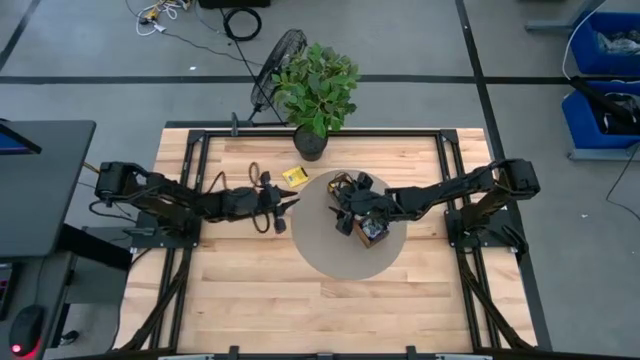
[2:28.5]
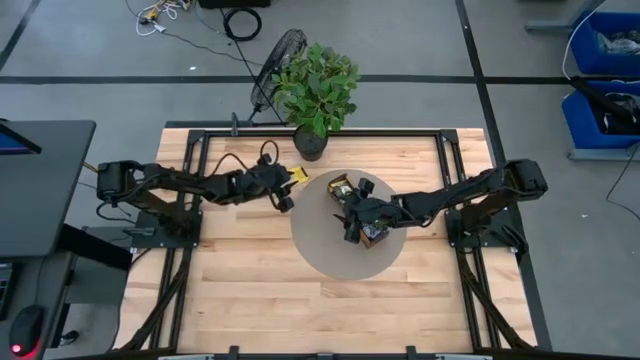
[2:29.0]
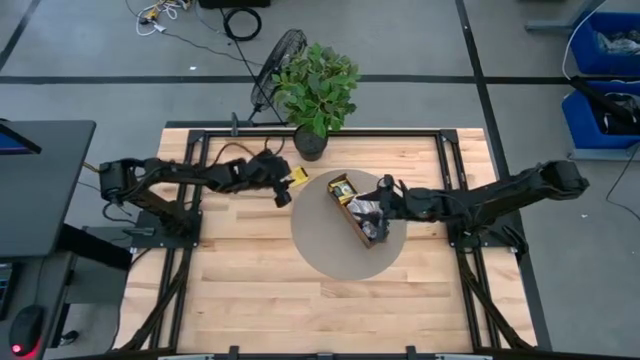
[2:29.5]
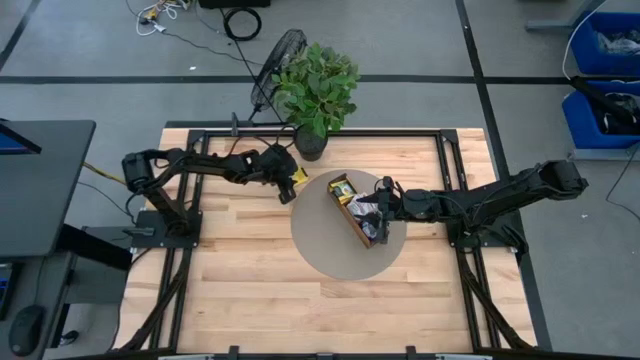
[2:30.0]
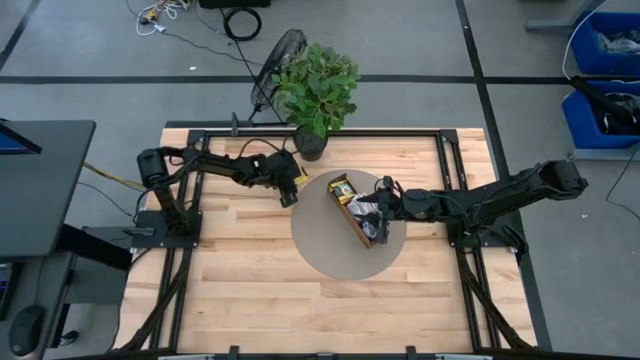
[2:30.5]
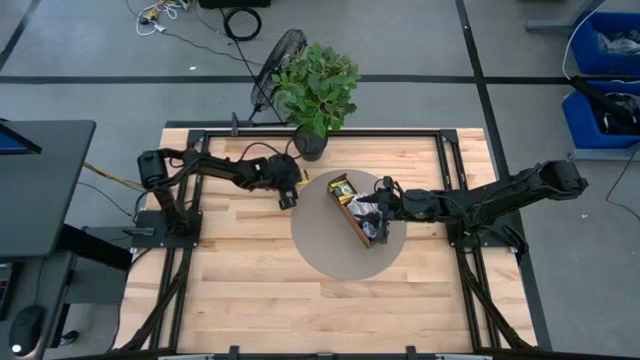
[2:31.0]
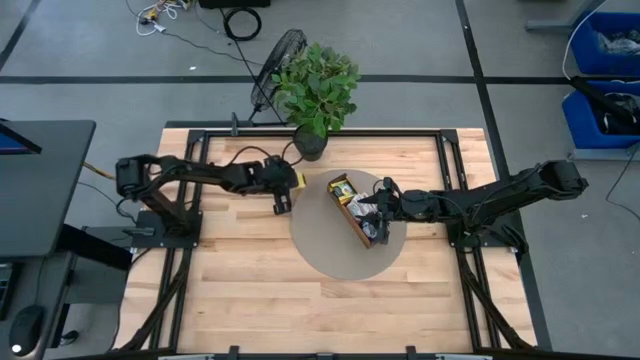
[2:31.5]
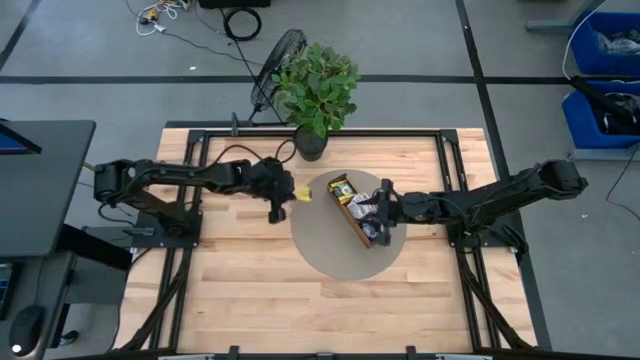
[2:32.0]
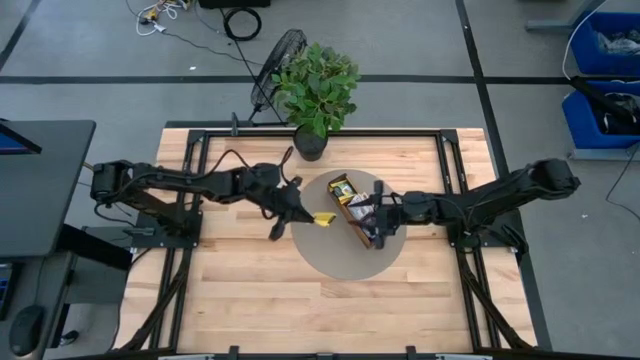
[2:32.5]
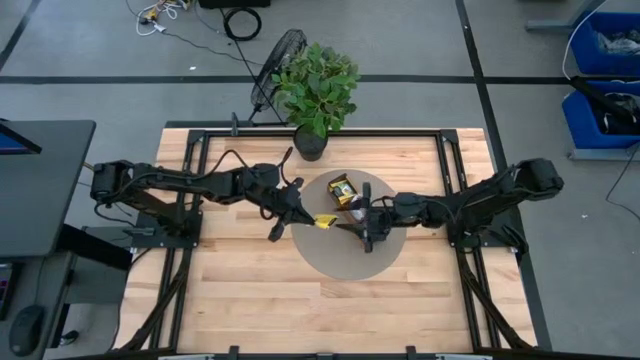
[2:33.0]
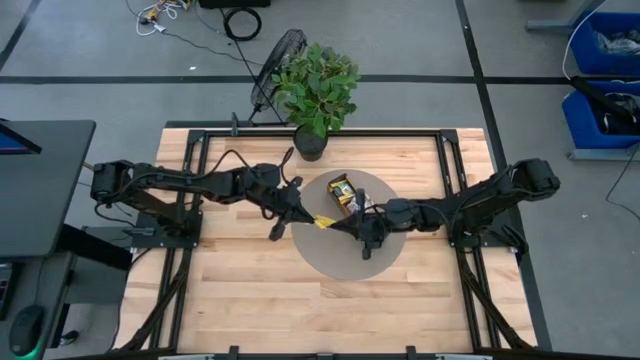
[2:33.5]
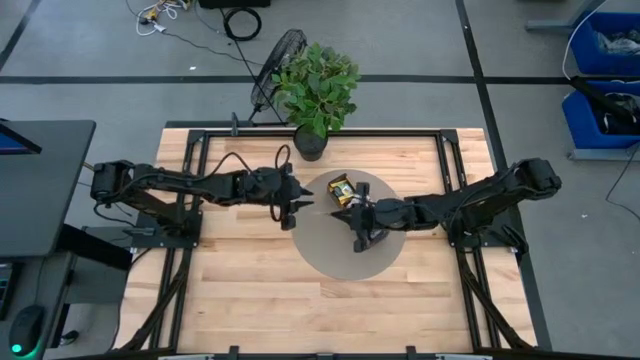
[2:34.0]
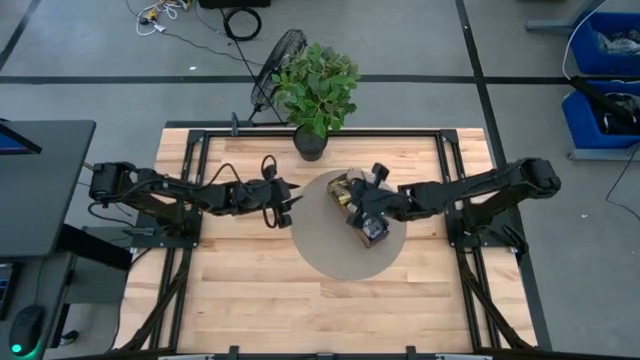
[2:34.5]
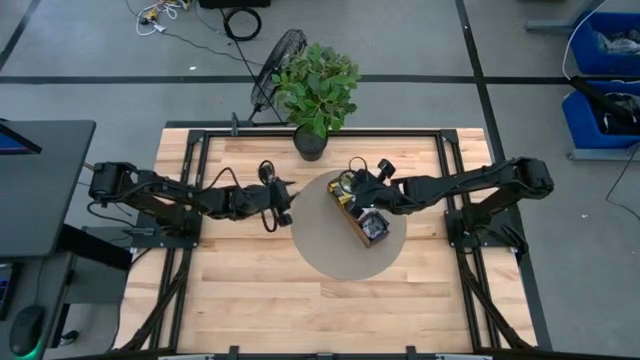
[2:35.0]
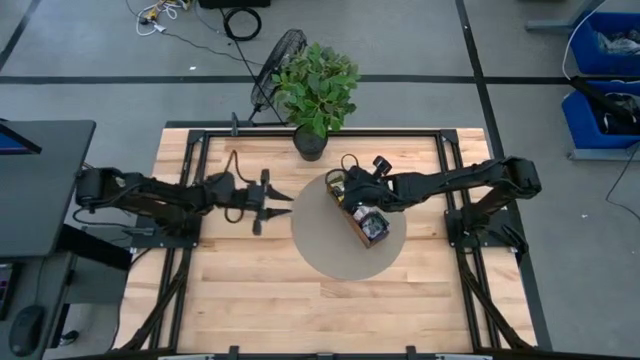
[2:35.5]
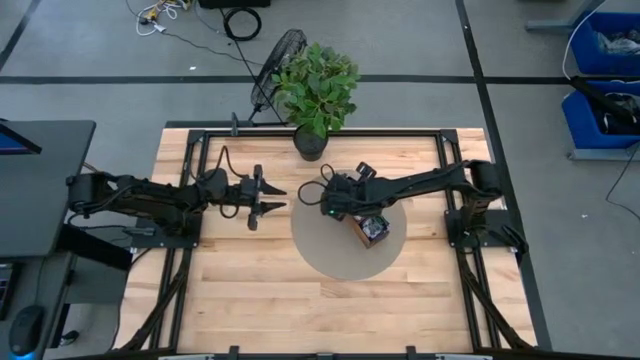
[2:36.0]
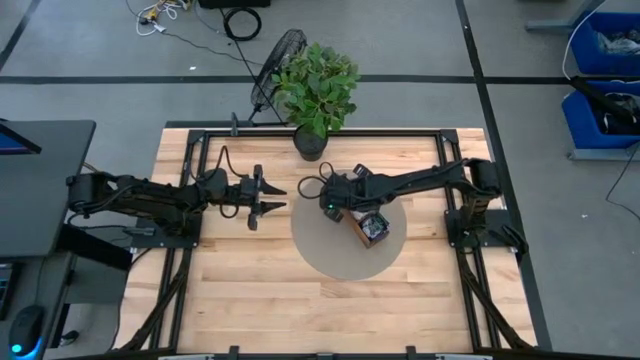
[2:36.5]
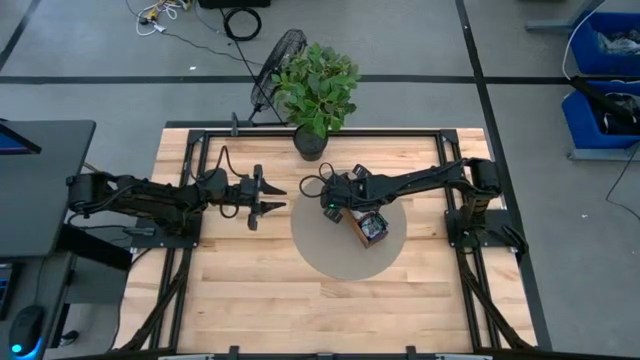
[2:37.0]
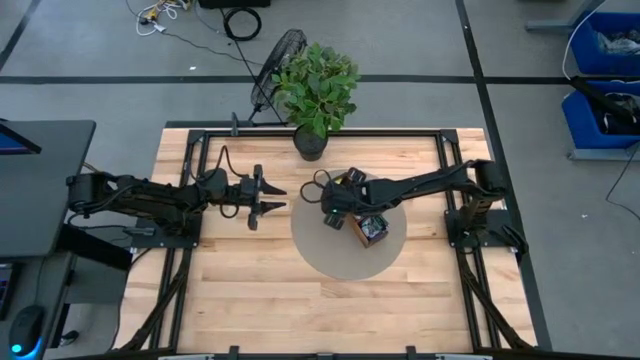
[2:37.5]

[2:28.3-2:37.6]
Task: Pick & Place Tea
Put the yellow tea bag into the left section of the wooden organizer

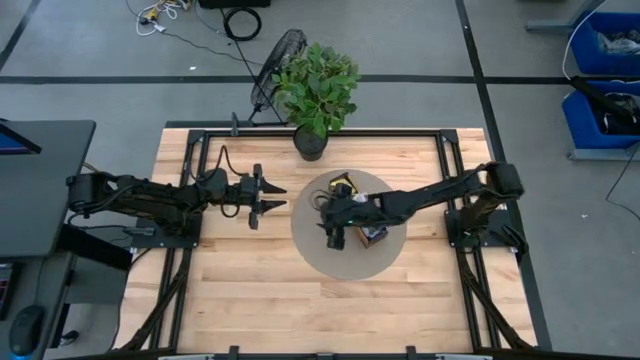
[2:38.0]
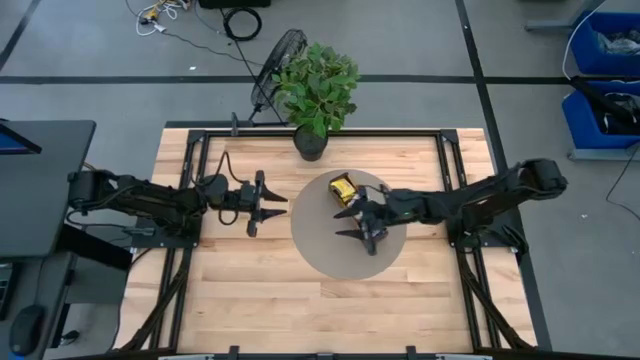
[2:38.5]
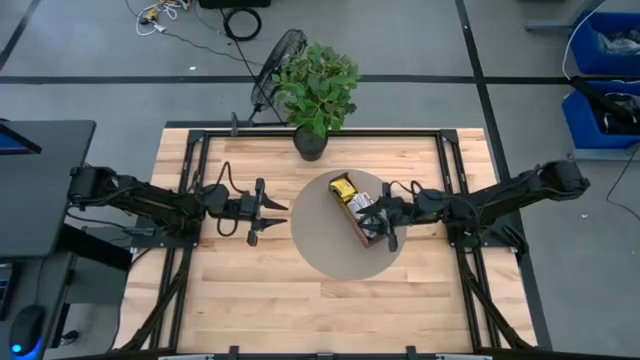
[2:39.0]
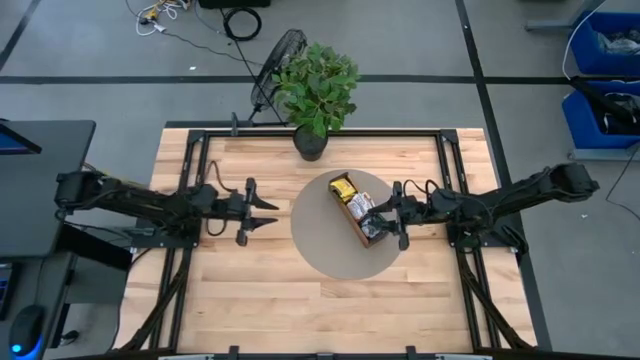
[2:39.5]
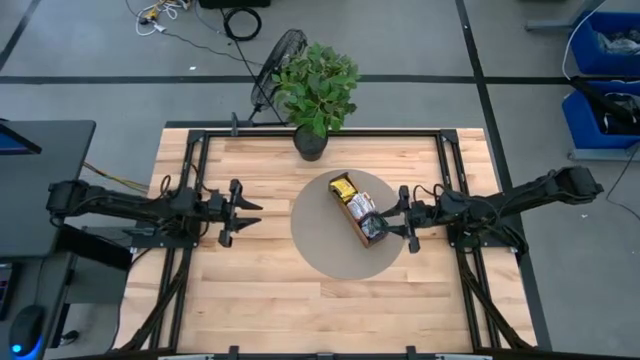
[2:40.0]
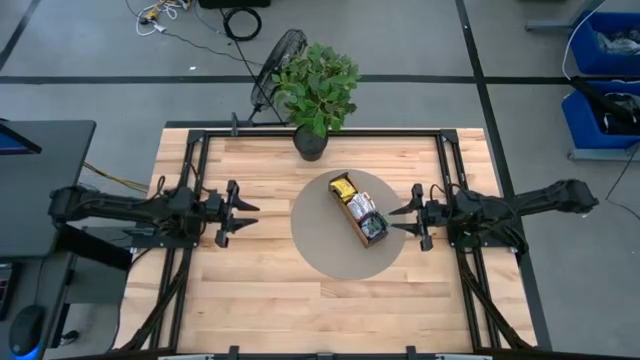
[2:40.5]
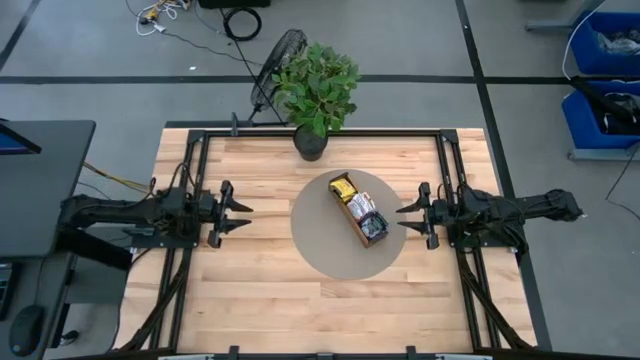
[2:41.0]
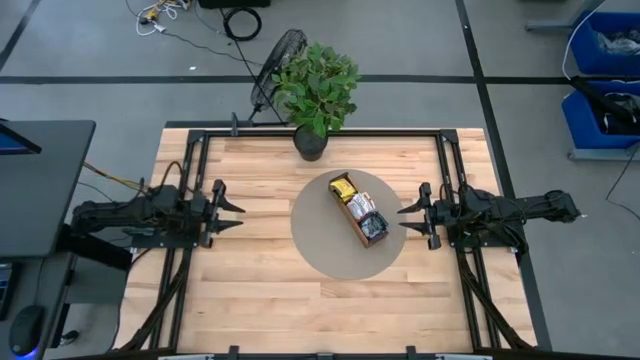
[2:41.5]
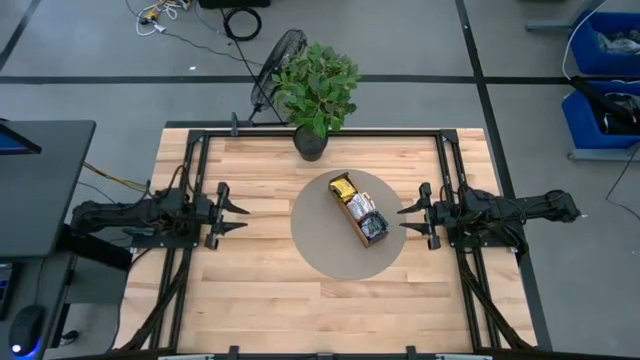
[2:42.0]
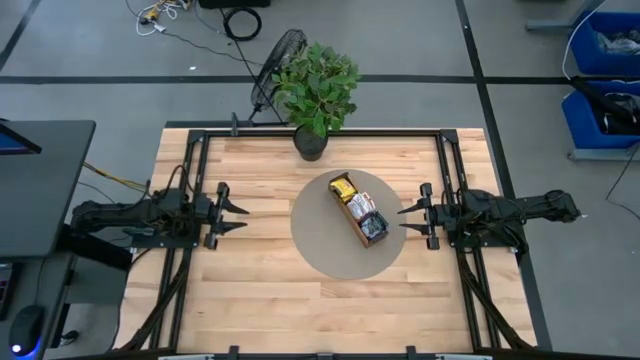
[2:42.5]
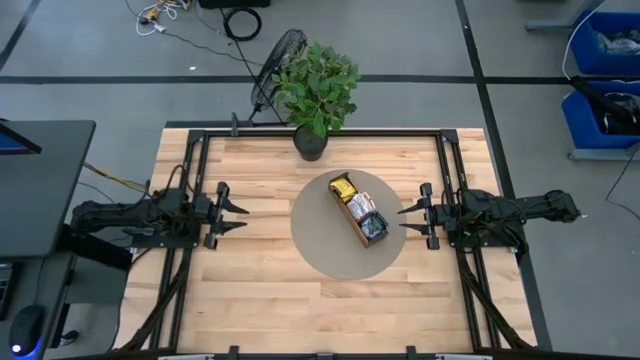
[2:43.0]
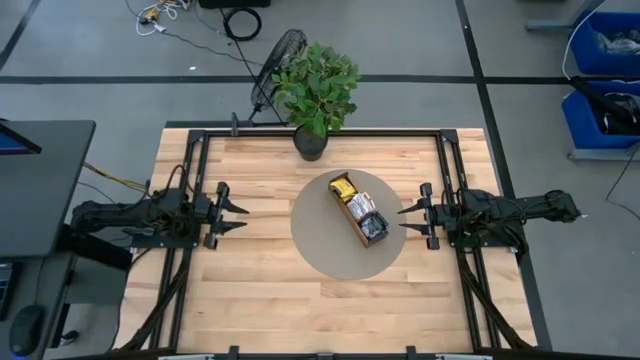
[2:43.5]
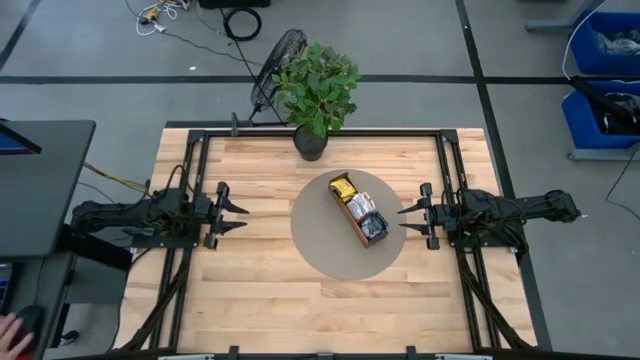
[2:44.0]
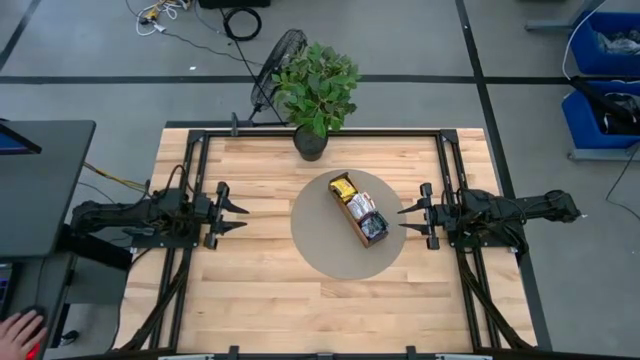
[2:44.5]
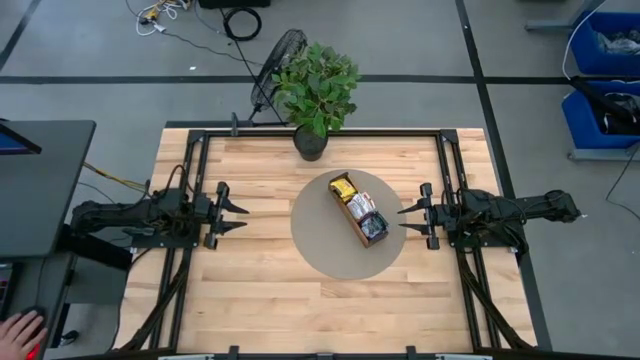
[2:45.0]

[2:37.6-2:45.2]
Return to Home Position

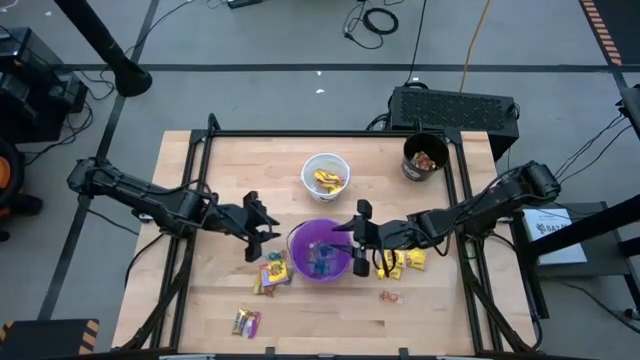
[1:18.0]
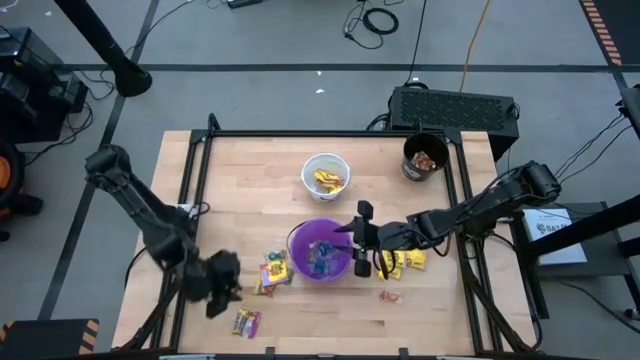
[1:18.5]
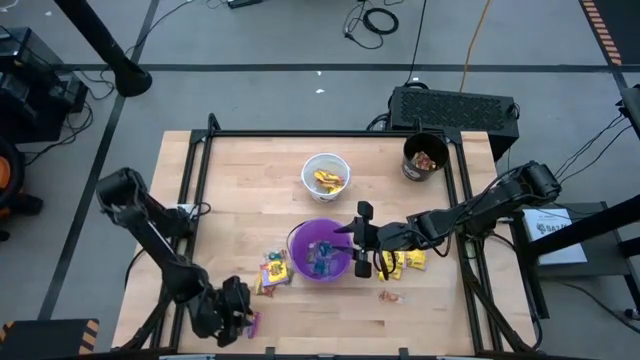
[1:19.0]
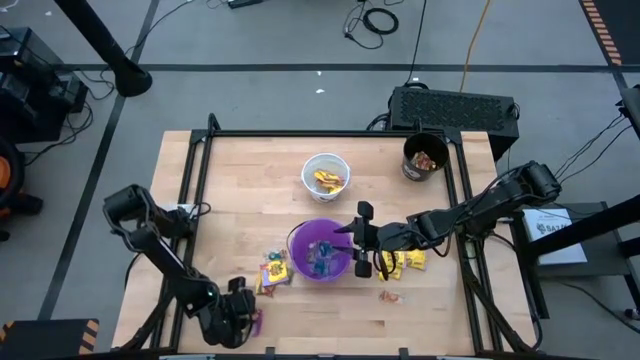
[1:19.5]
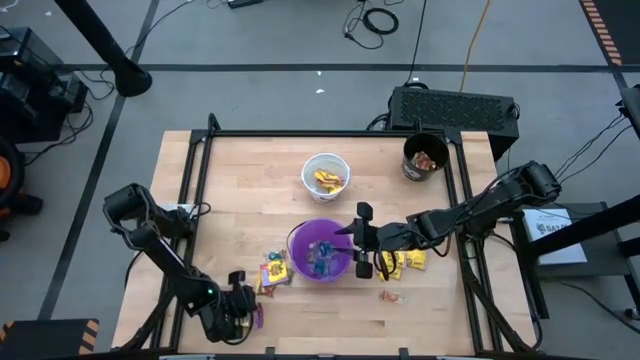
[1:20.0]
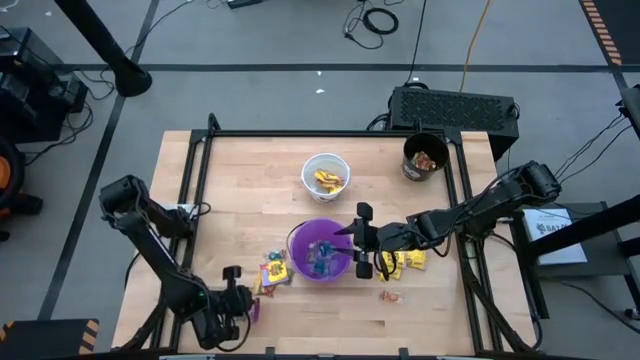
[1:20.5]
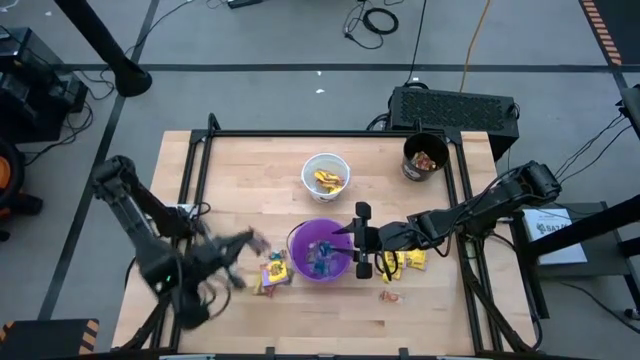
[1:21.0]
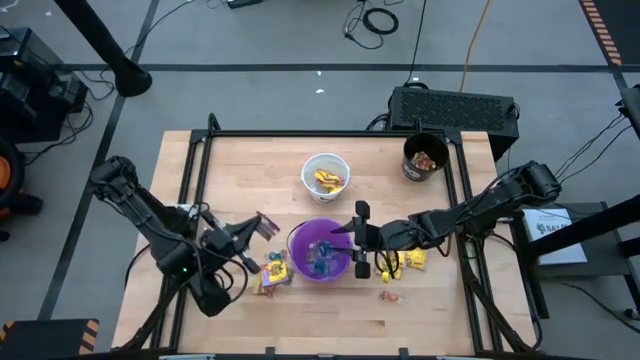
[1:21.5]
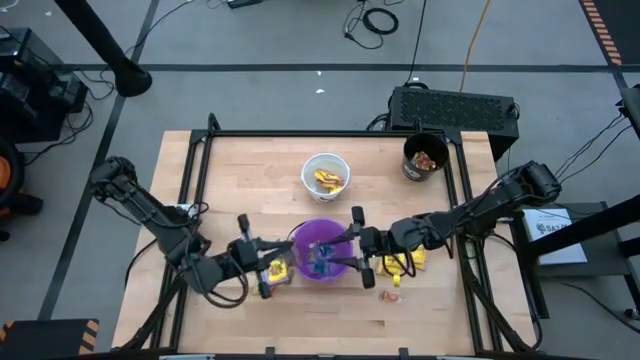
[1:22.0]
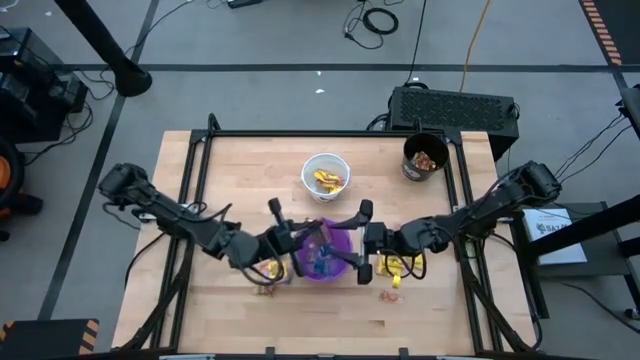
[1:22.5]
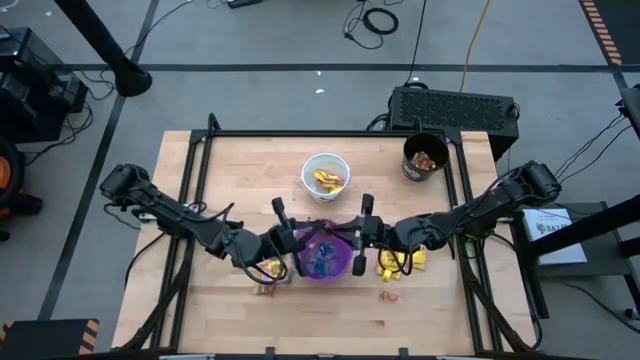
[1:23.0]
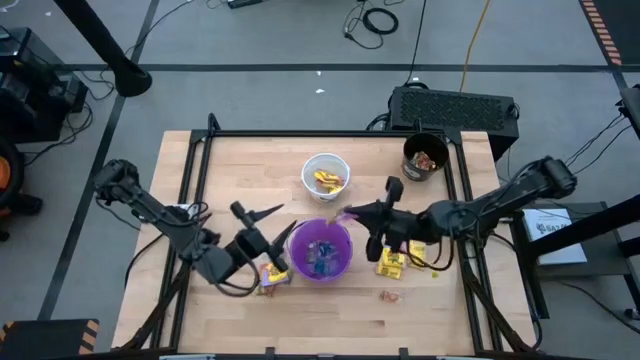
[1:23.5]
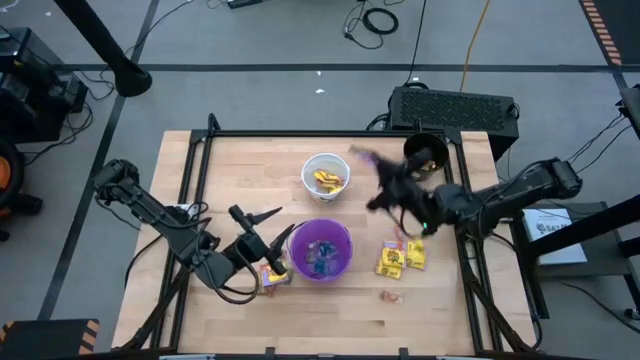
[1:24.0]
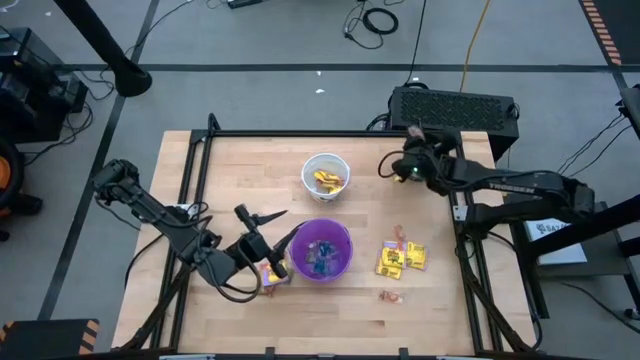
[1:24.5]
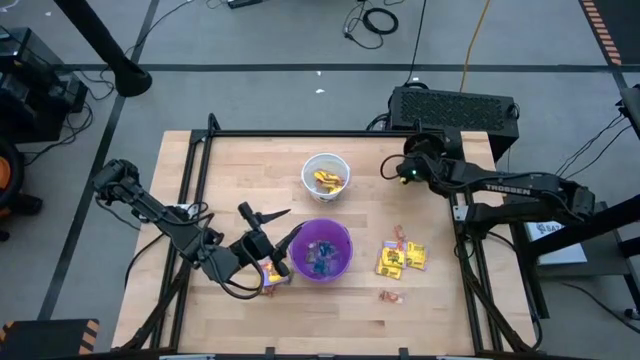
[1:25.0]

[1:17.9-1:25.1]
Task: Sort candy by brand, put in halloween buckets
Put the violet candy into the black bucket
